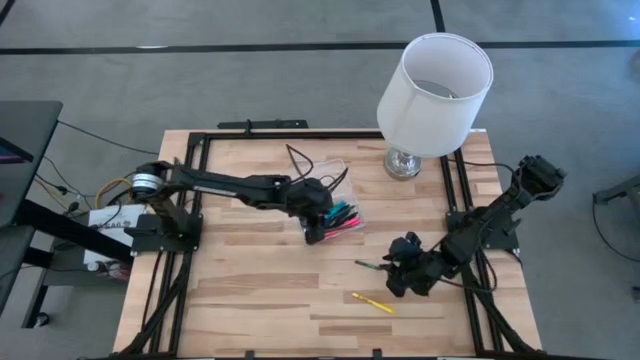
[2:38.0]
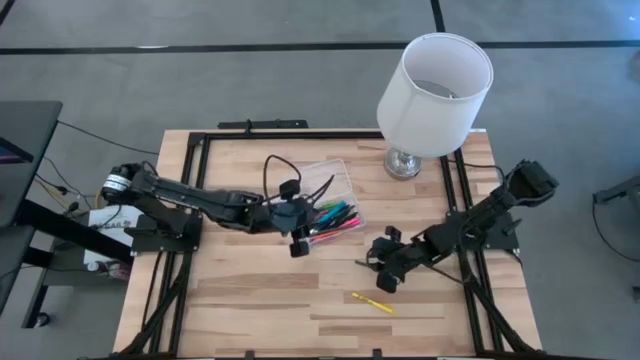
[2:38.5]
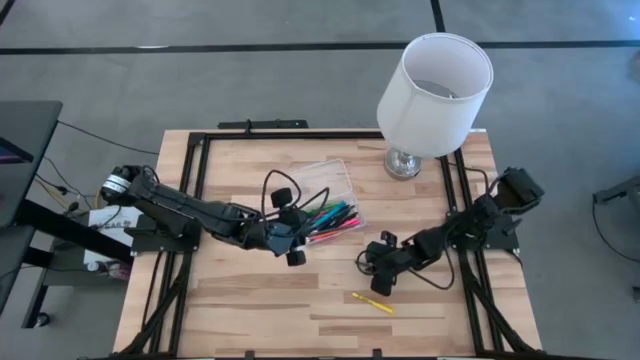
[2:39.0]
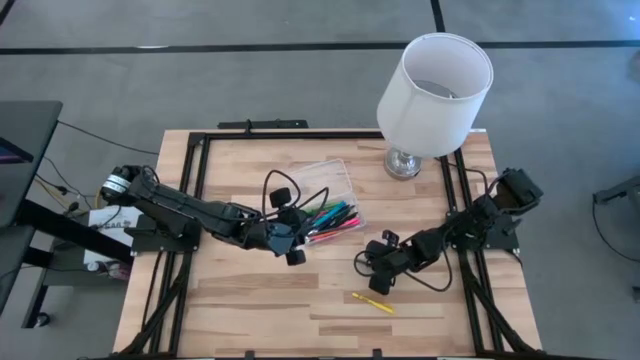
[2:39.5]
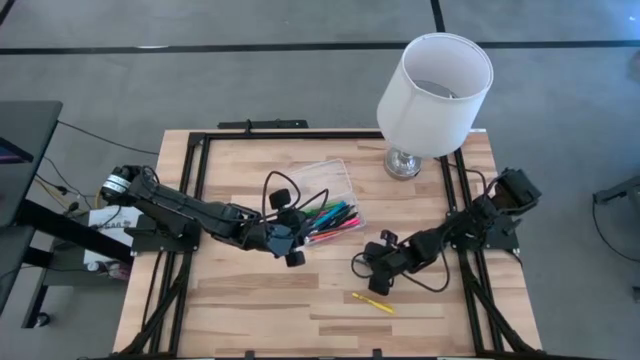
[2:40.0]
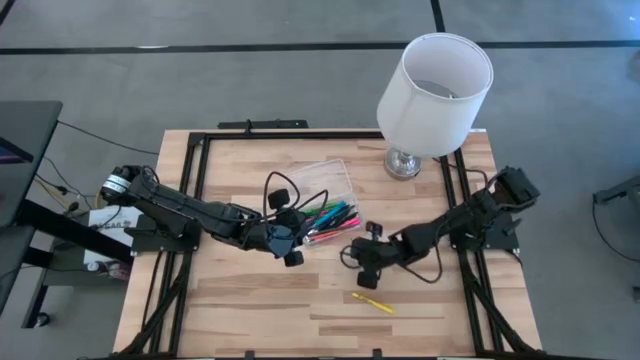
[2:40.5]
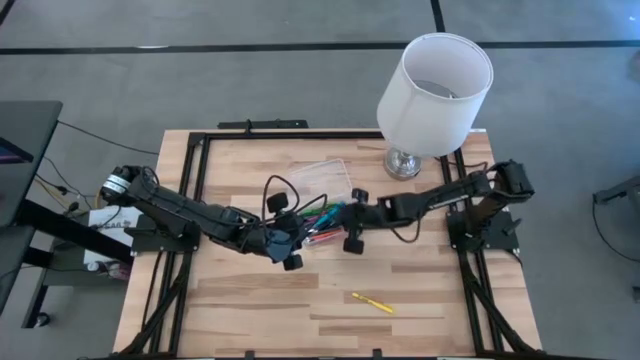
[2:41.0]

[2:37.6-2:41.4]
Task: Pick & place school supplies into a supply box
Put the green crayon into the transparent supply box

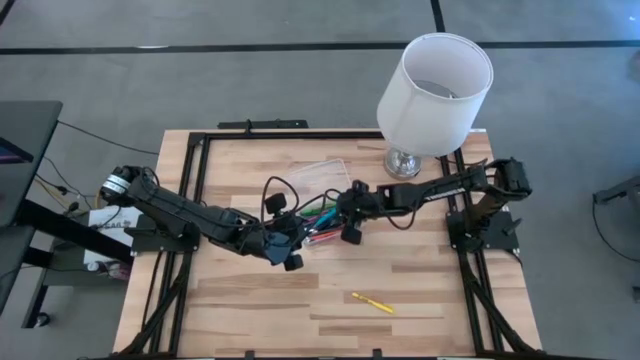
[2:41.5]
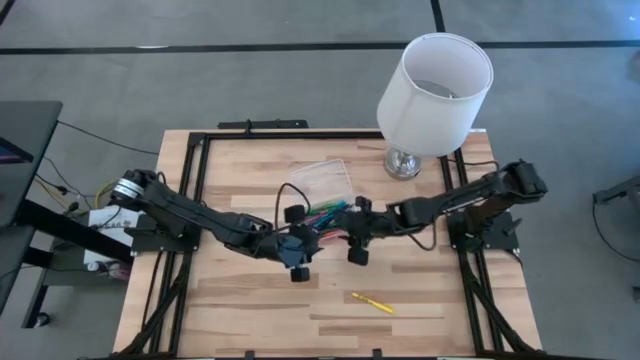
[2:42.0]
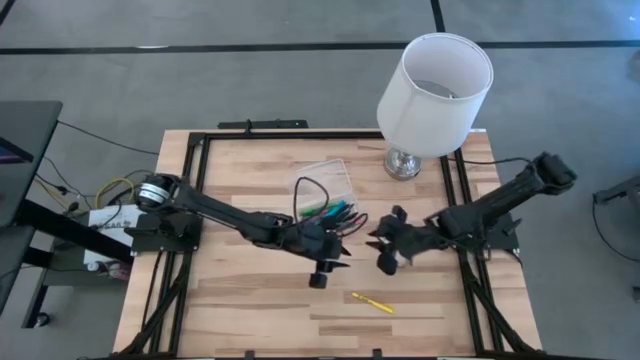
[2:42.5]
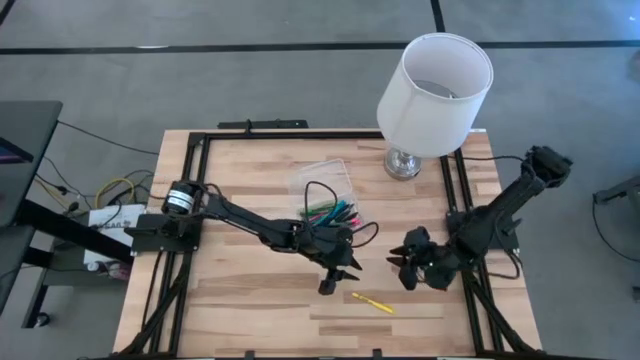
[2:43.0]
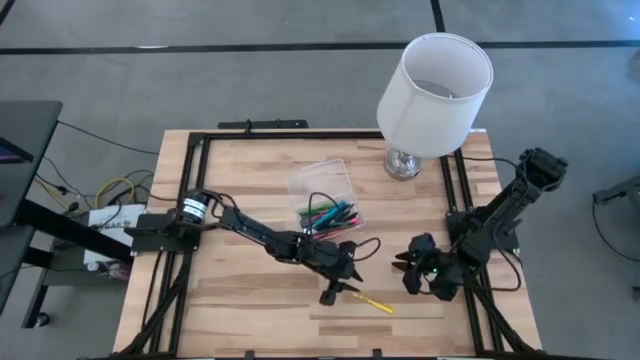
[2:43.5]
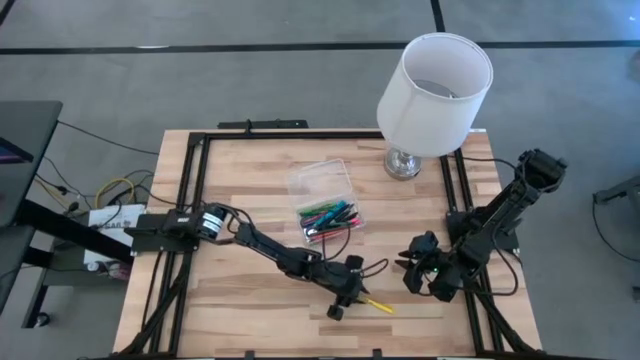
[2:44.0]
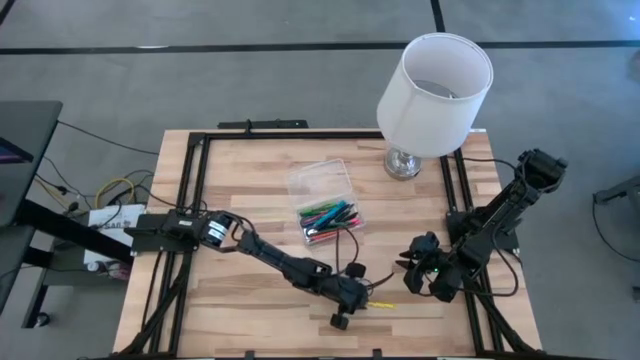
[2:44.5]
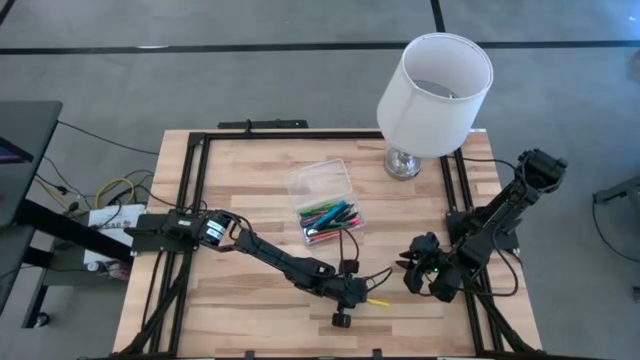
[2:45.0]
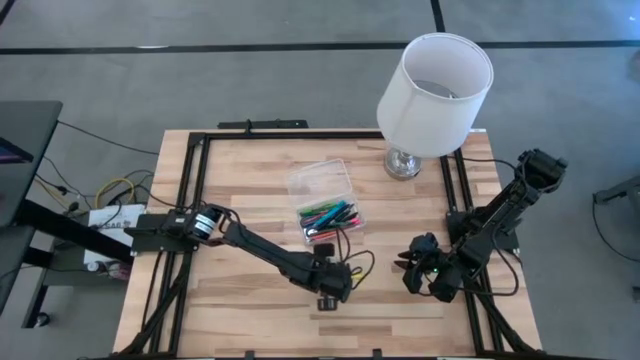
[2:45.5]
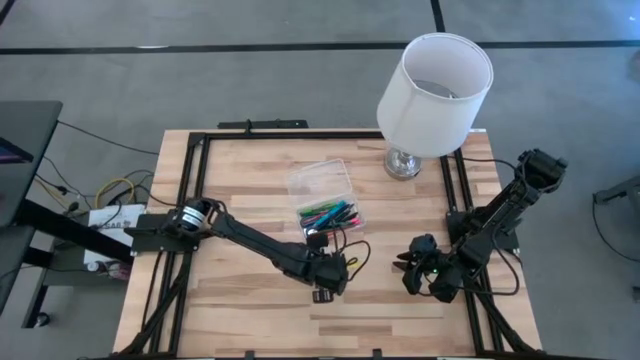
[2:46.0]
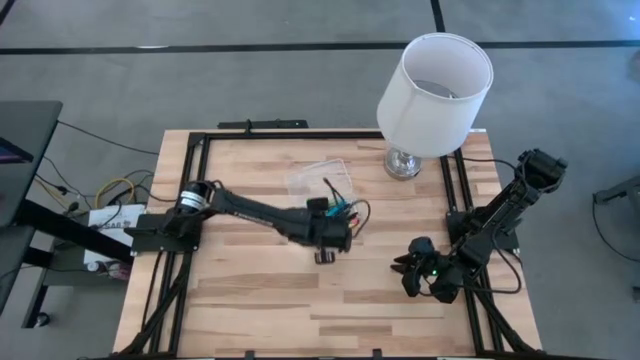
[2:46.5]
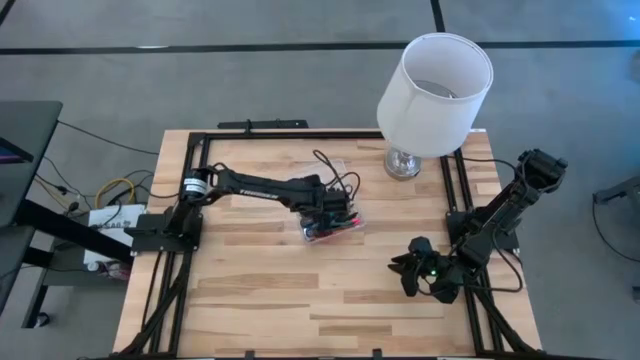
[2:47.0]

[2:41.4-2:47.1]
Put the yellow ballpen into the transparent supply box

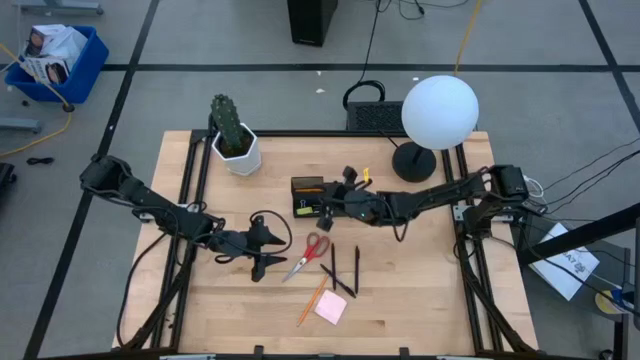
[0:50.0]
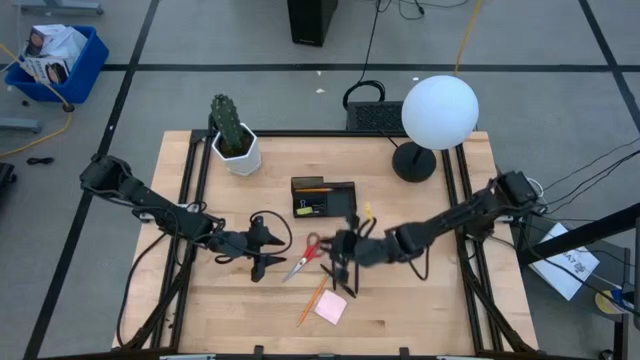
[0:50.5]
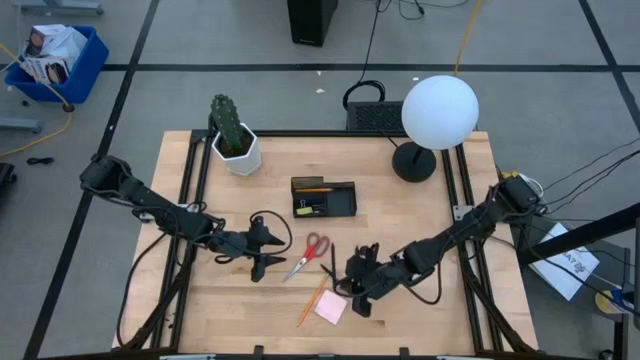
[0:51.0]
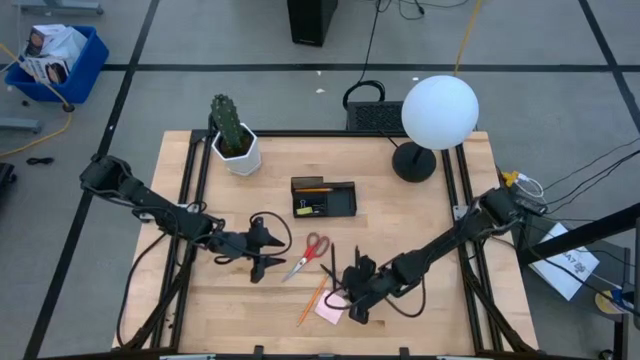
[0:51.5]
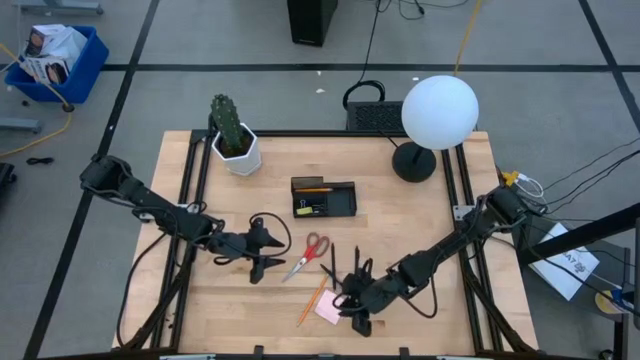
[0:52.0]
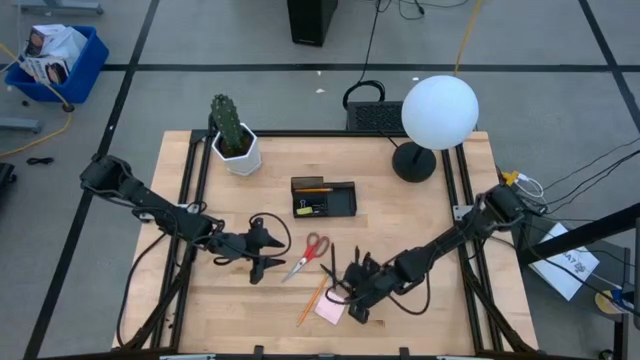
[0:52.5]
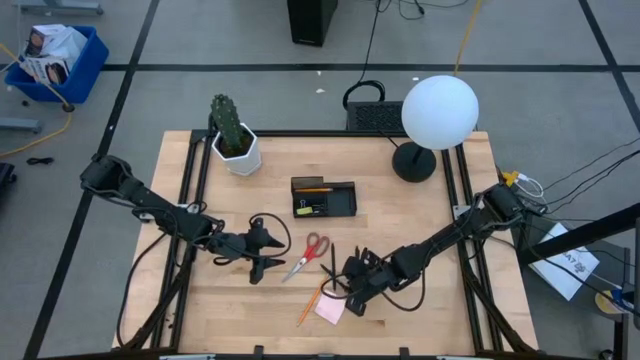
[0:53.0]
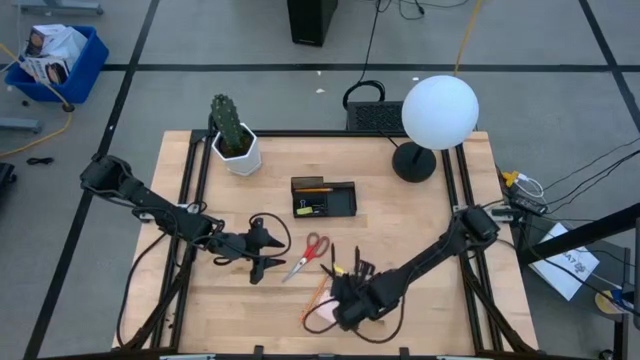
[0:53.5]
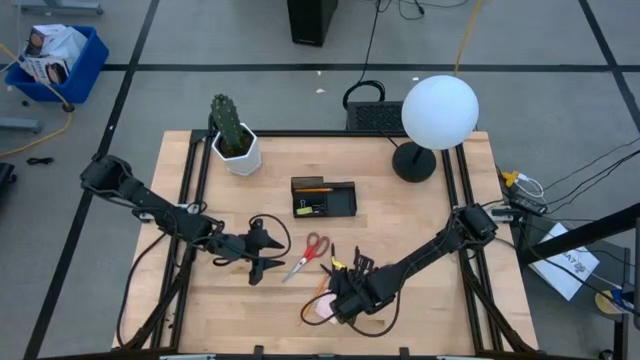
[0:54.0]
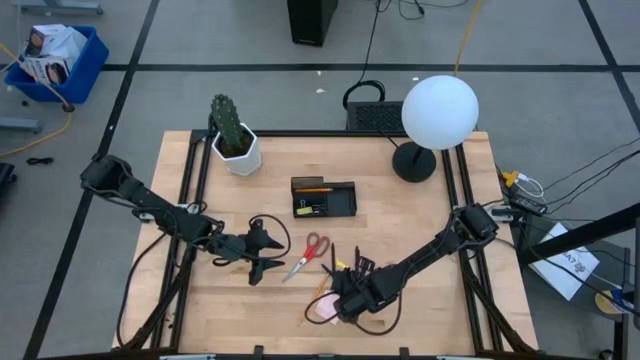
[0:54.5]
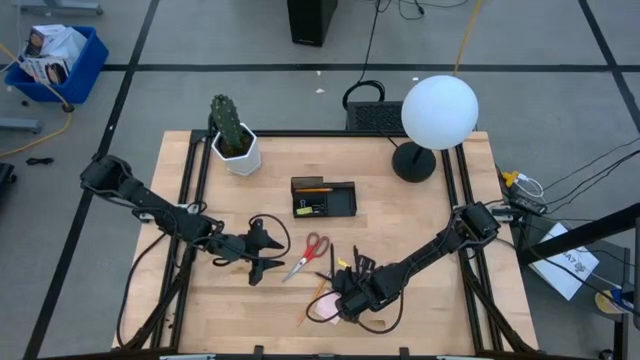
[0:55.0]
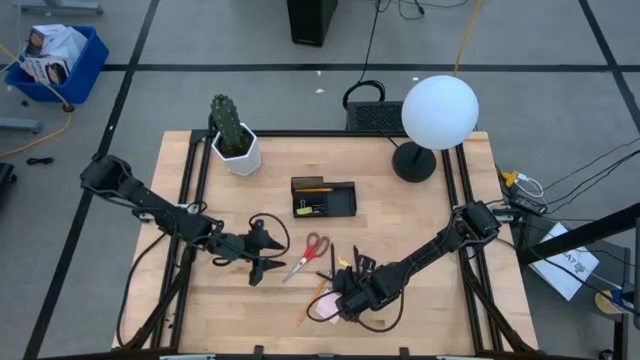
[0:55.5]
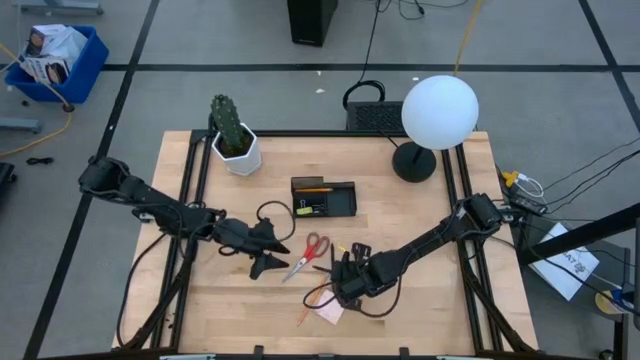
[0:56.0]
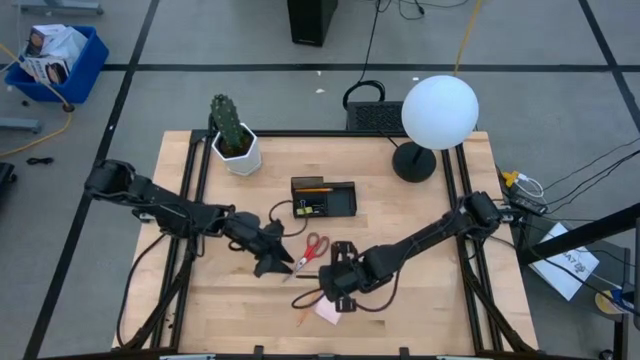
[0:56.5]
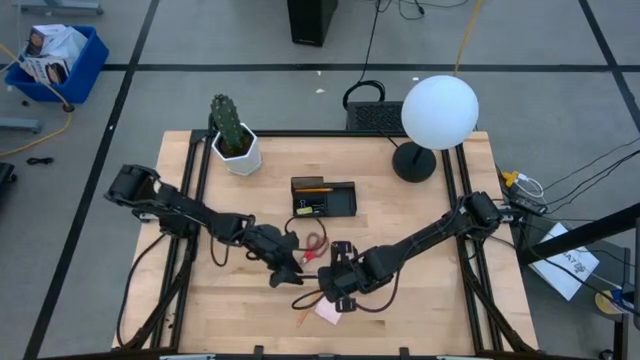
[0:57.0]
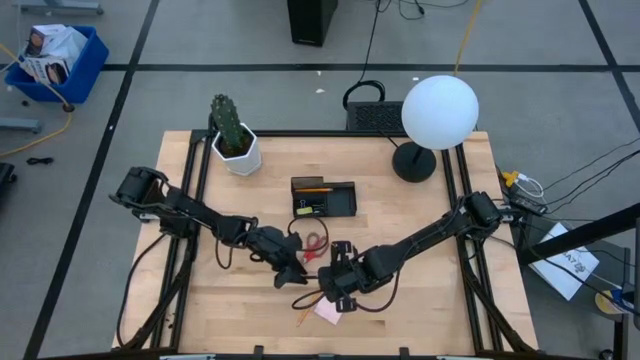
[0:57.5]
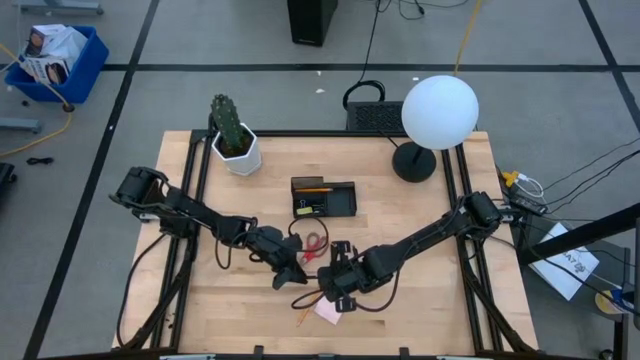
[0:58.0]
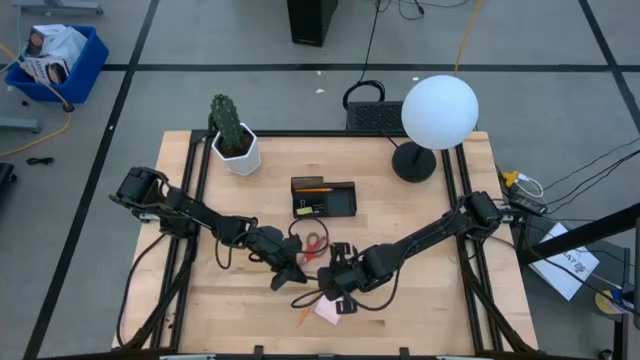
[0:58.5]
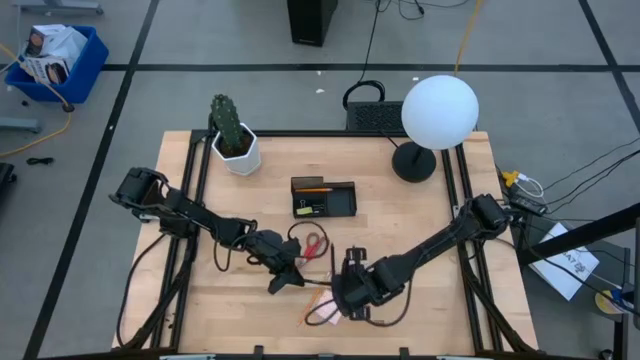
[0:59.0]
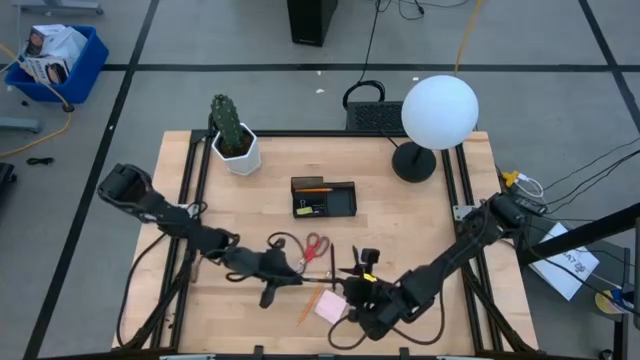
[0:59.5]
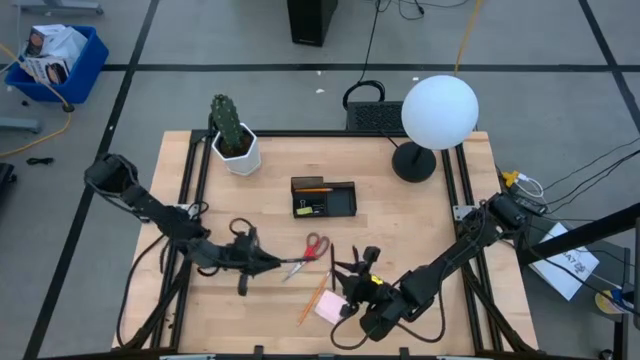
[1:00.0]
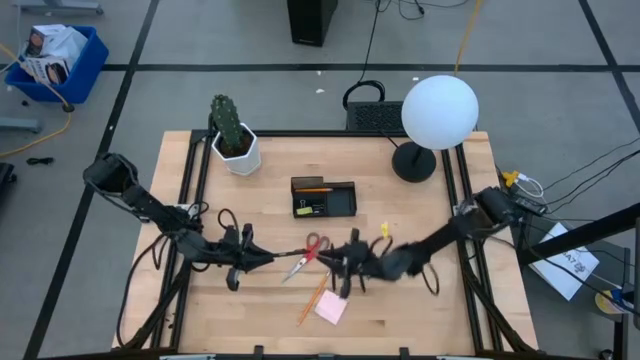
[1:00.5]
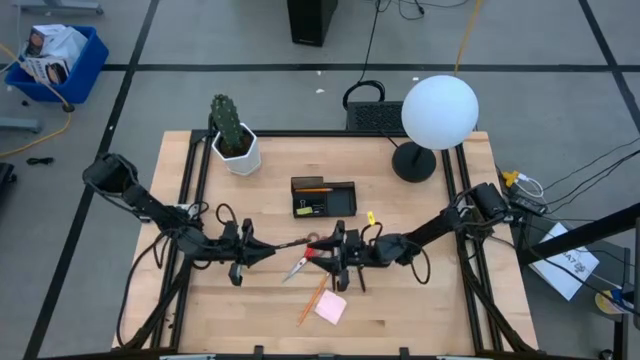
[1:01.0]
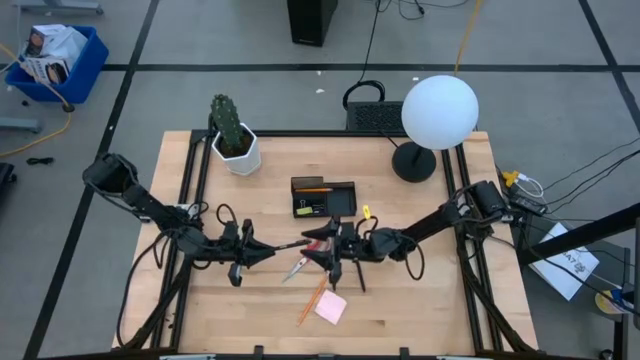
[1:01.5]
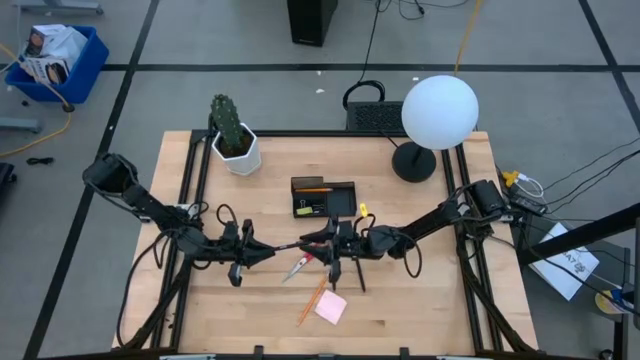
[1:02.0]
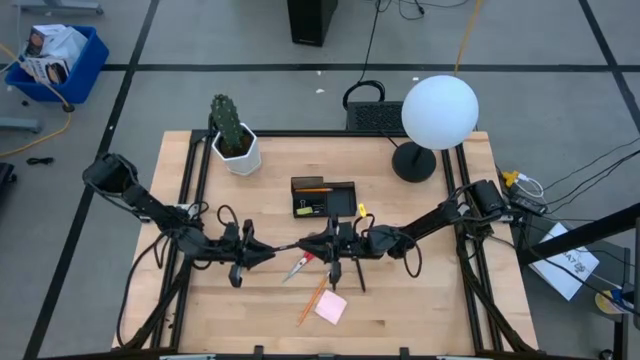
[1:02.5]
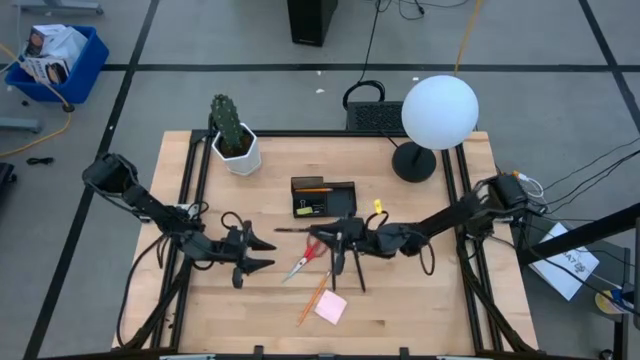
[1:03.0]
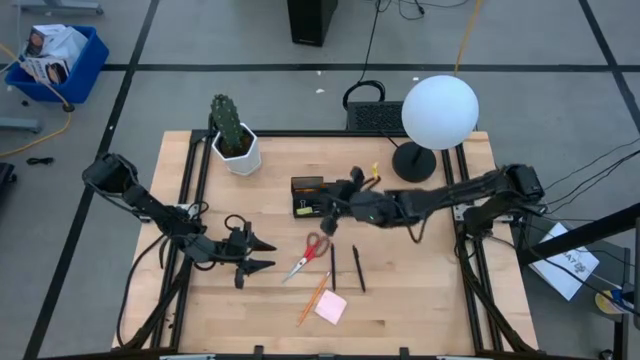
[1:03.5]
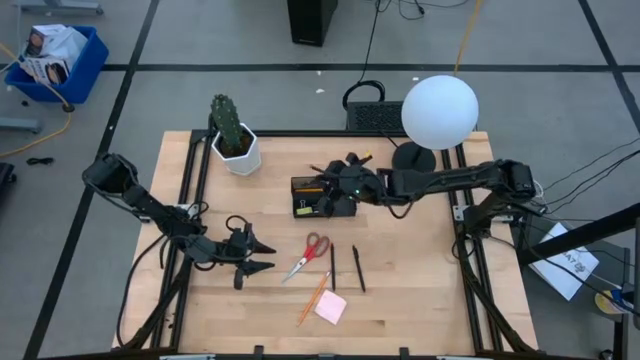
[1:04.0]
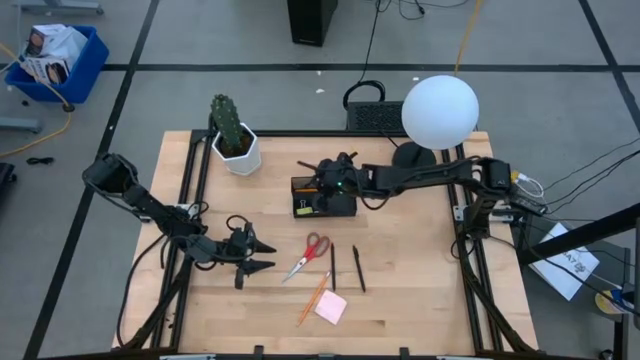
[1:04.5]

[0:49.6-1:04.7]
Task: Pick and place office supplies into organizer
Put the middle black pen into the top left of the desk organizer
